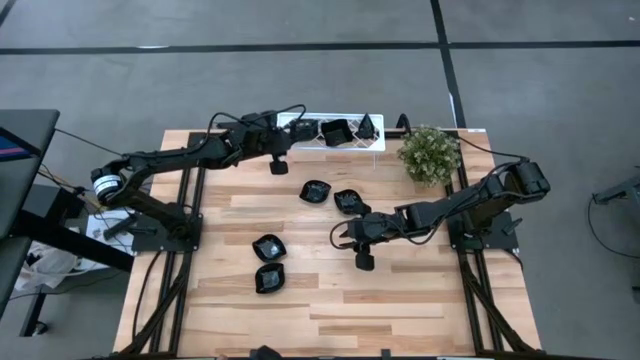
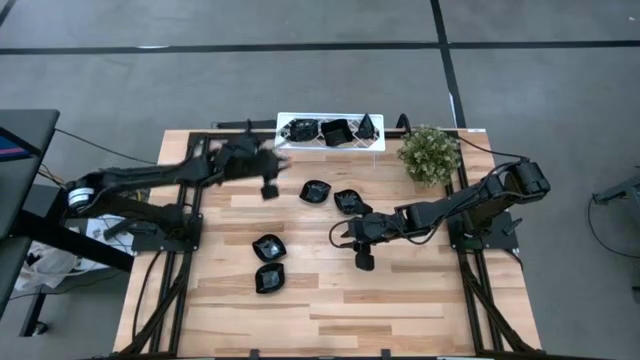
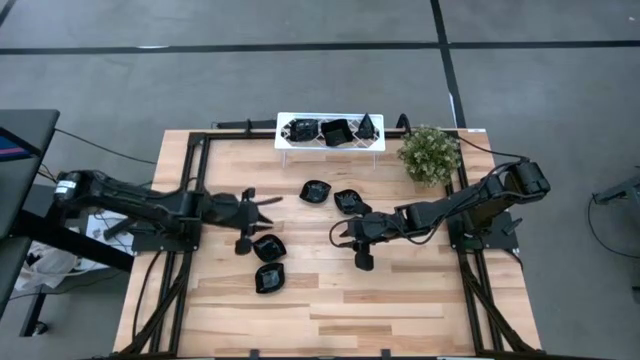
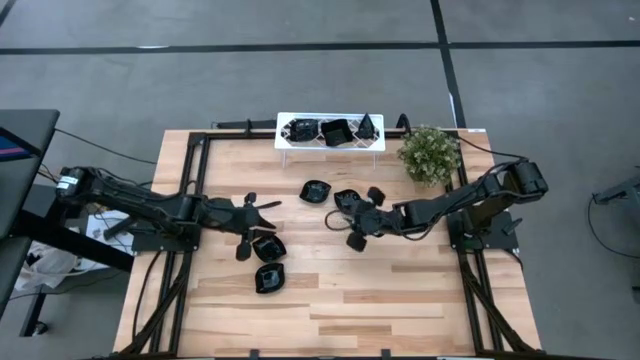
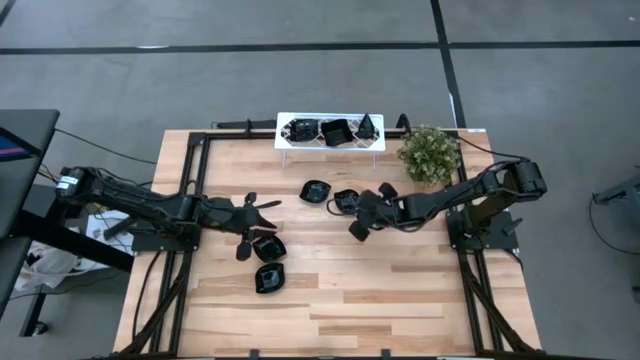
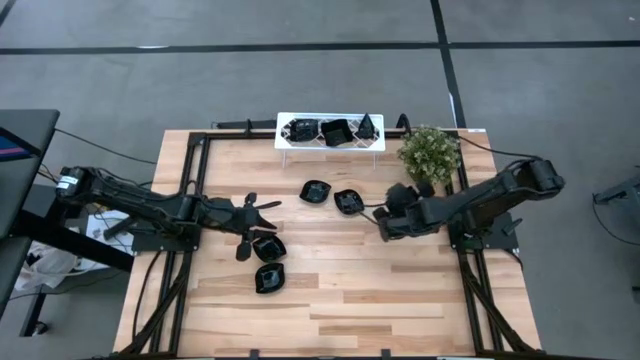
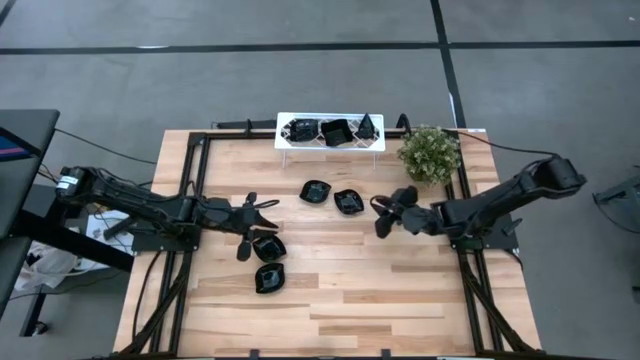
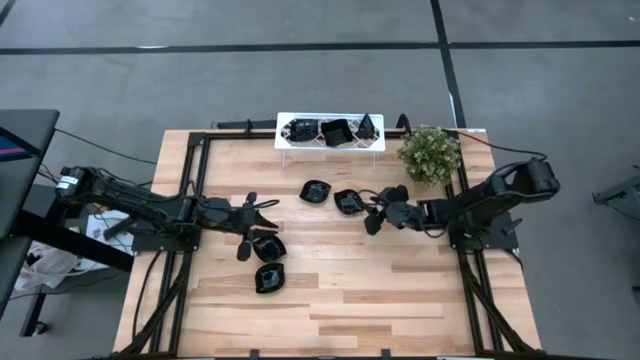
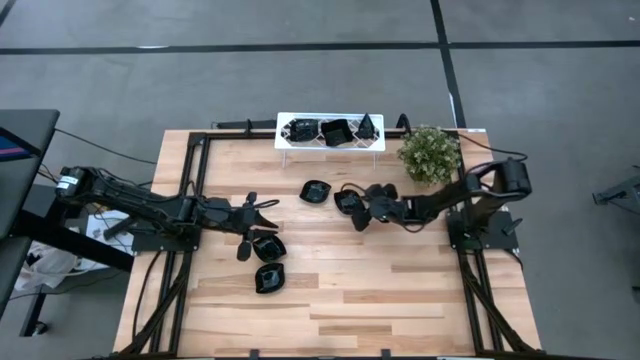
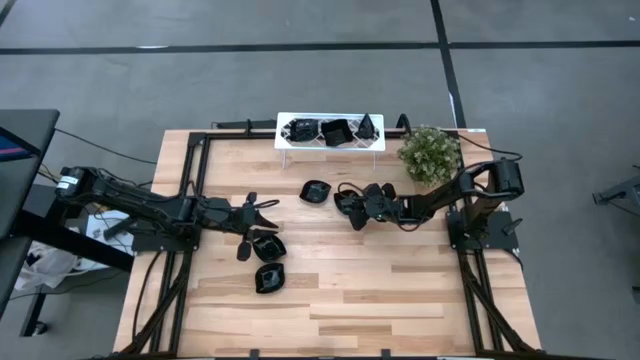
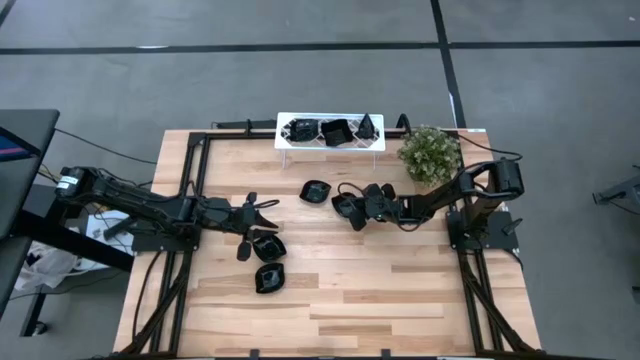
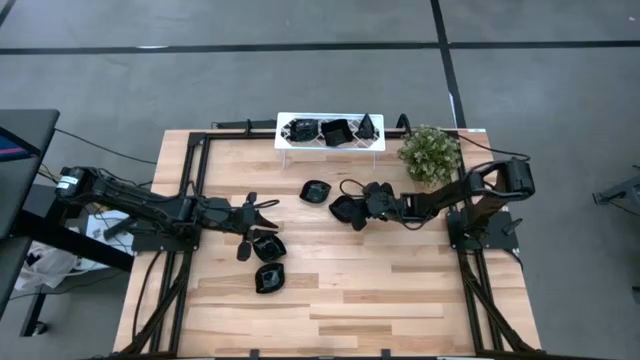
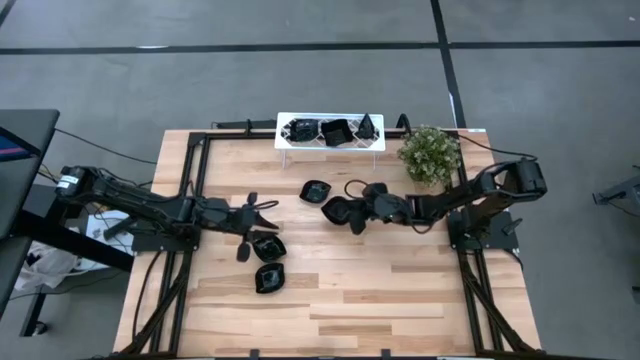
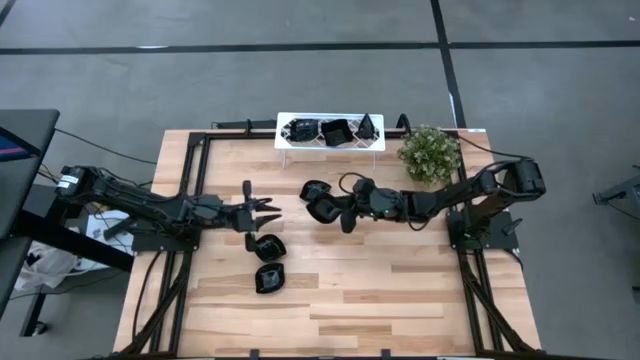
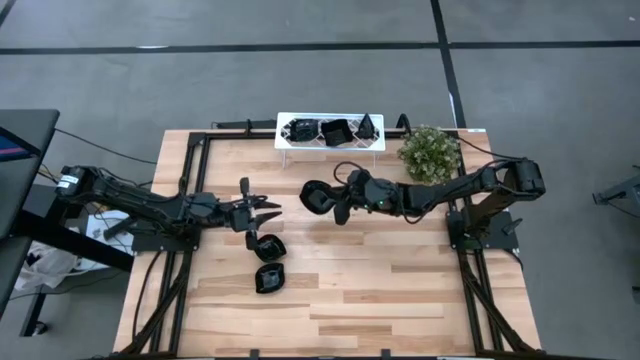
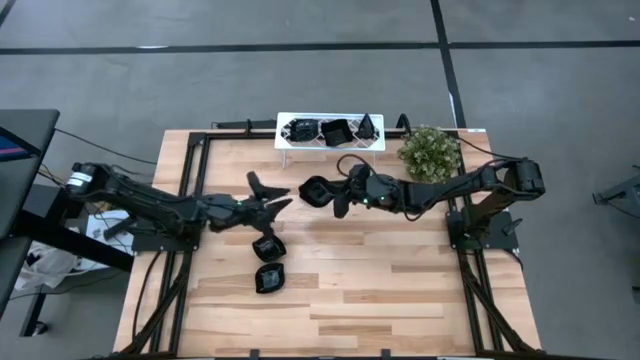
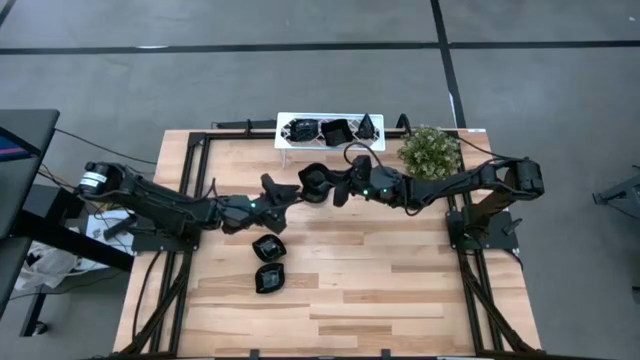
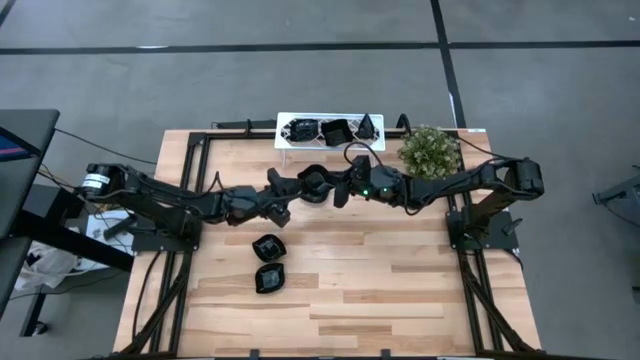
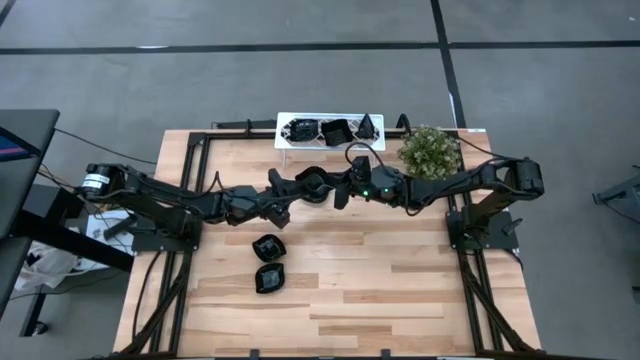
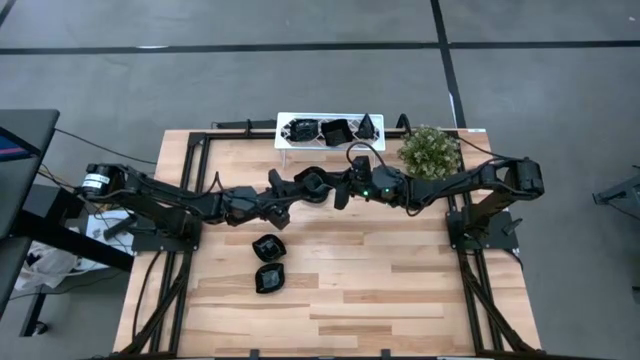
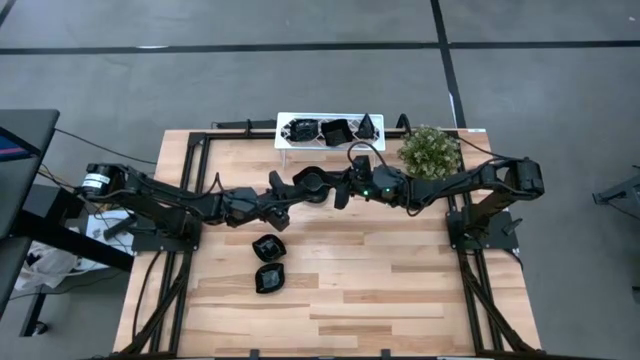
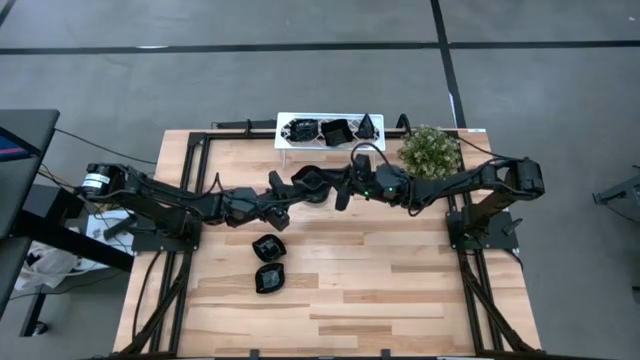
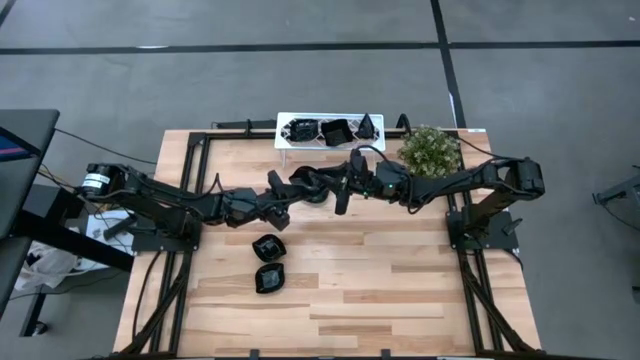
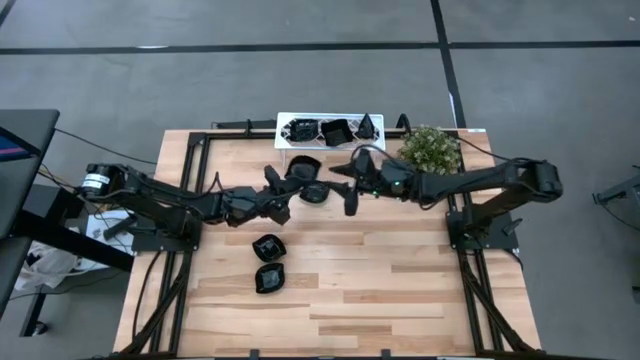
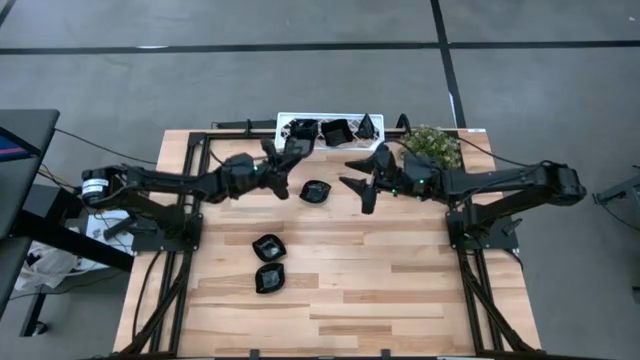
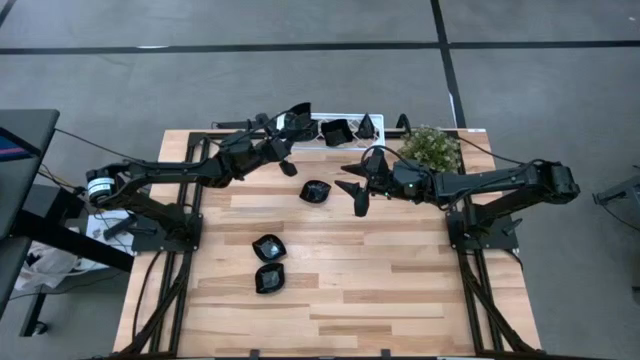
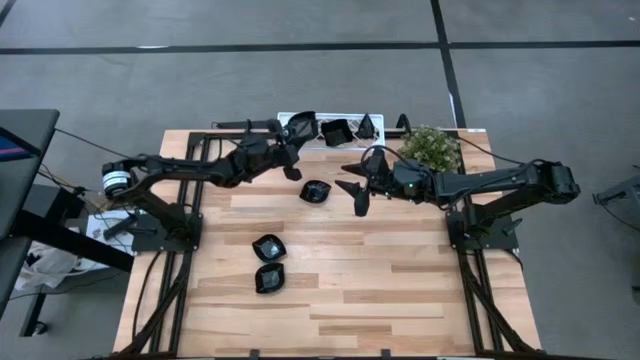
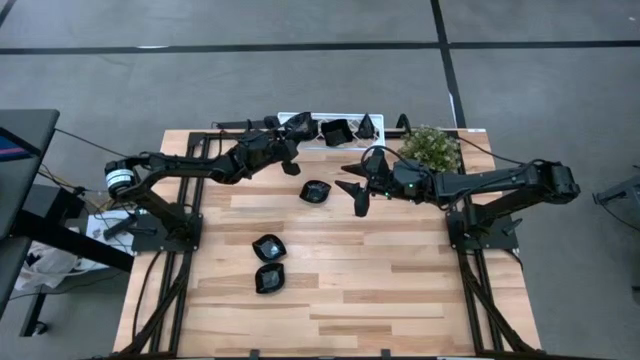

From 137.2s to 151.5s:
Task: Pick & Place Mini shaped plates
Stack the leaf-shaped plate on top of the leaf-shaped plate on the shelf

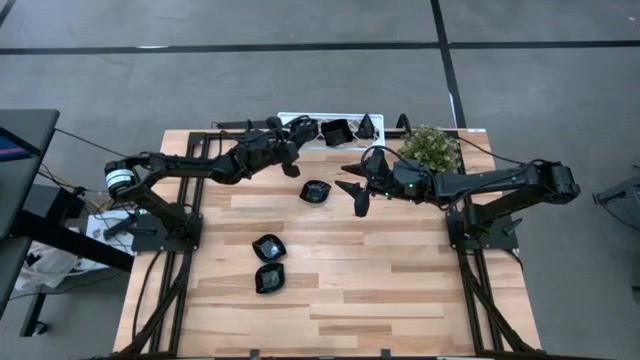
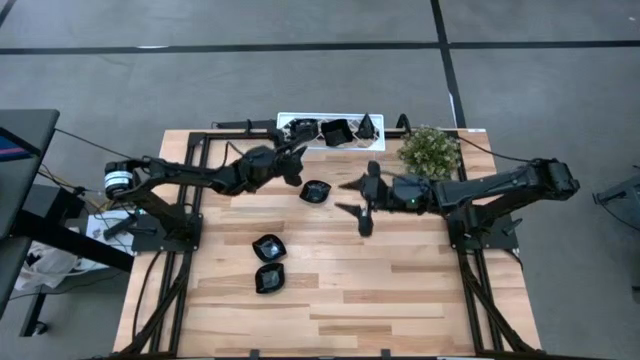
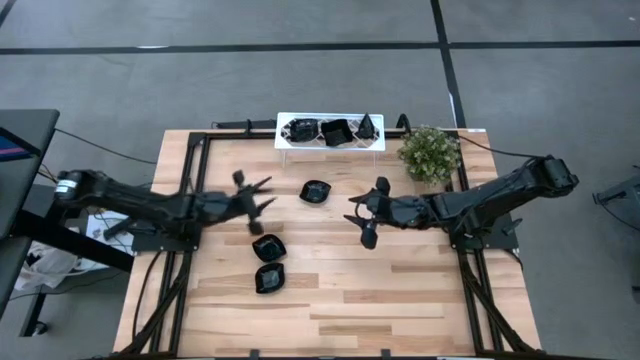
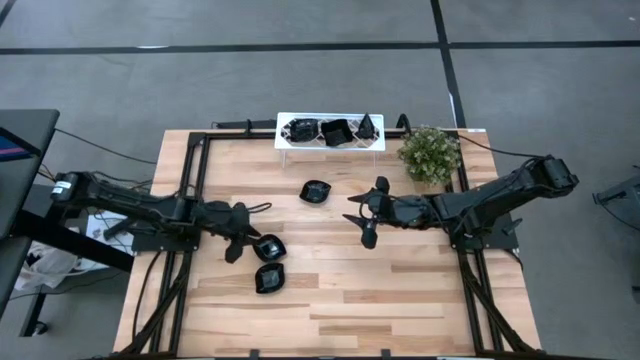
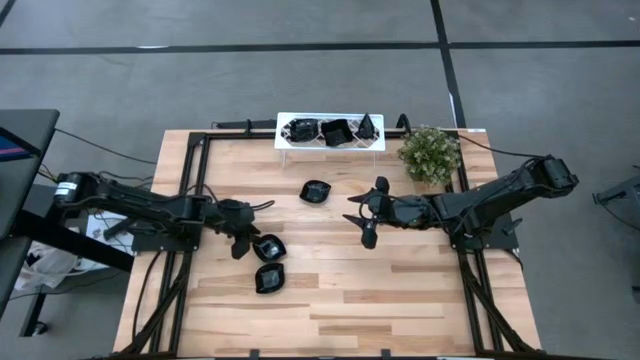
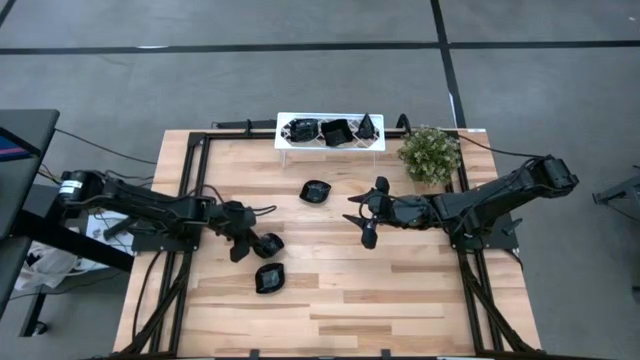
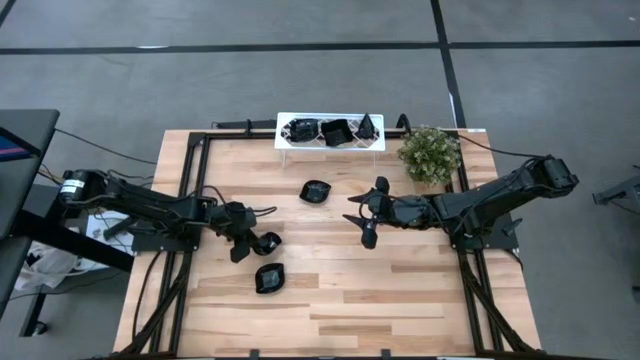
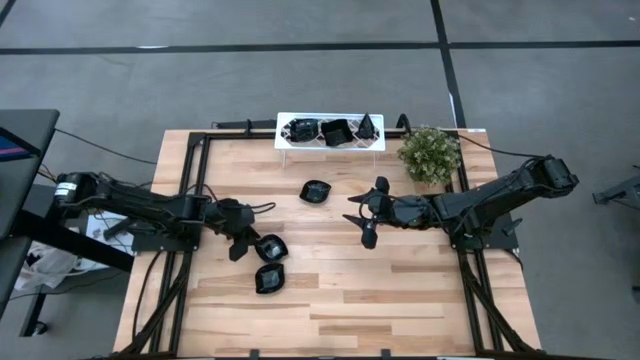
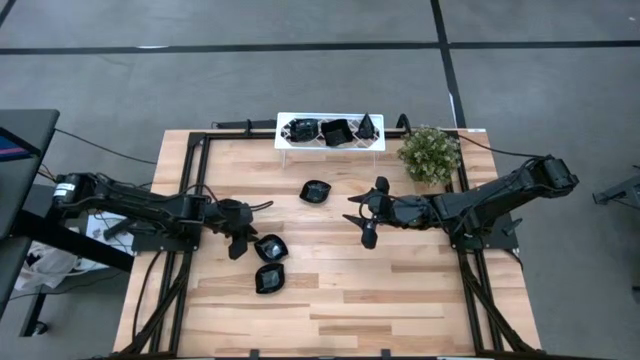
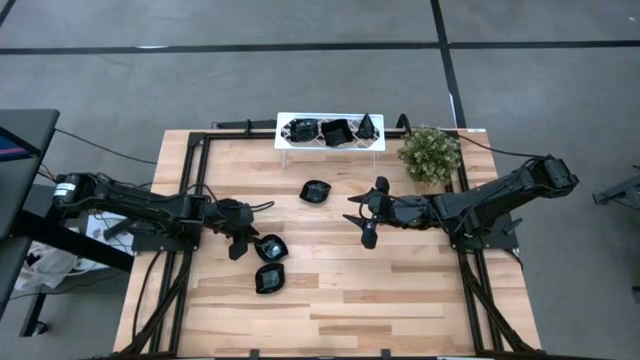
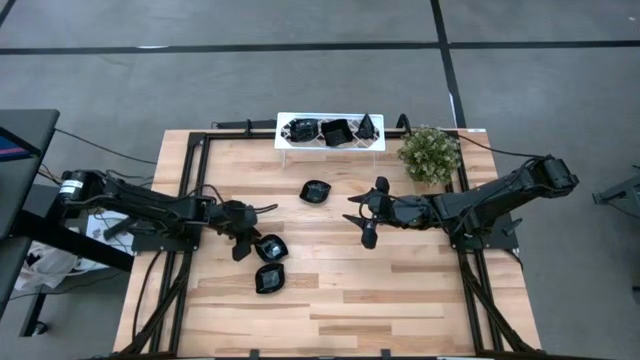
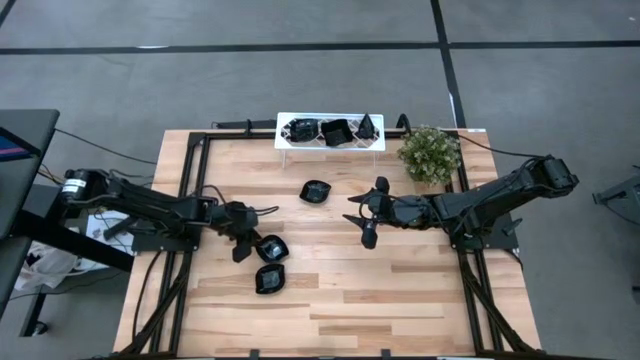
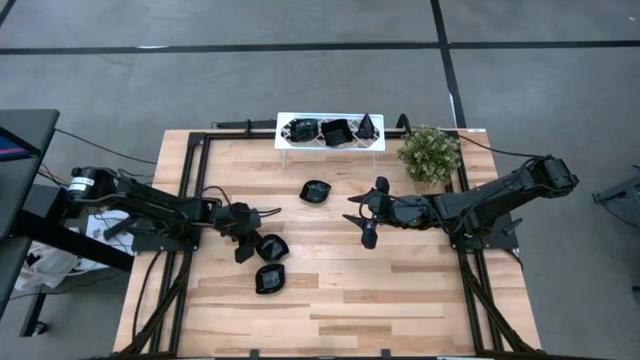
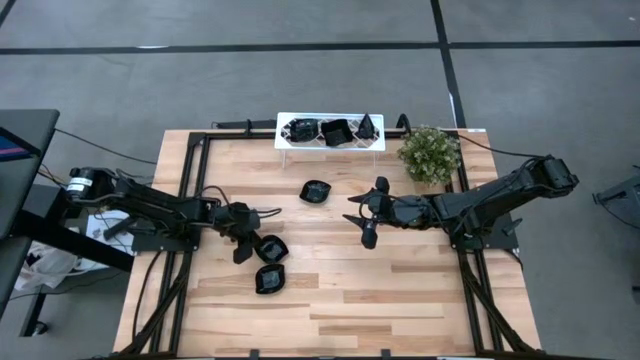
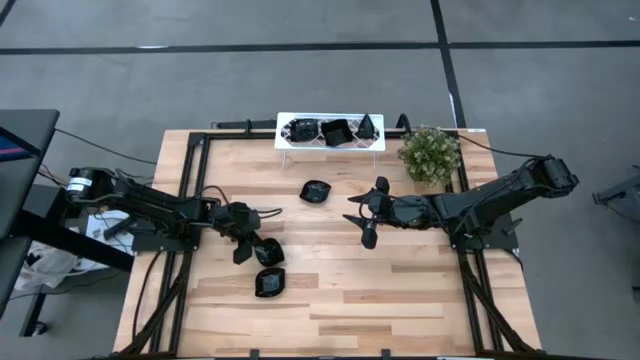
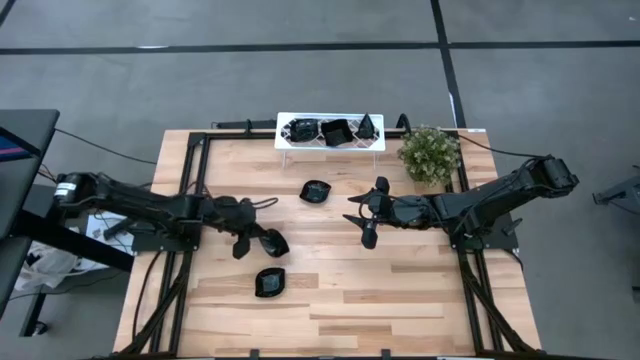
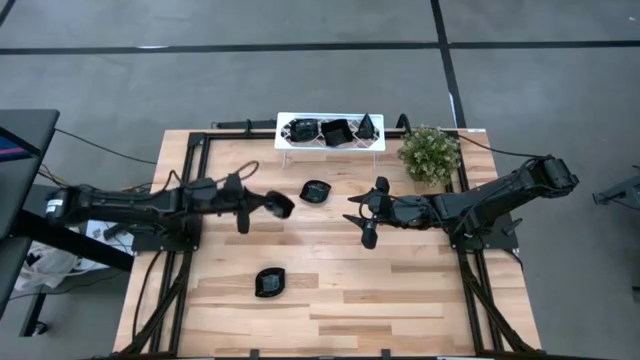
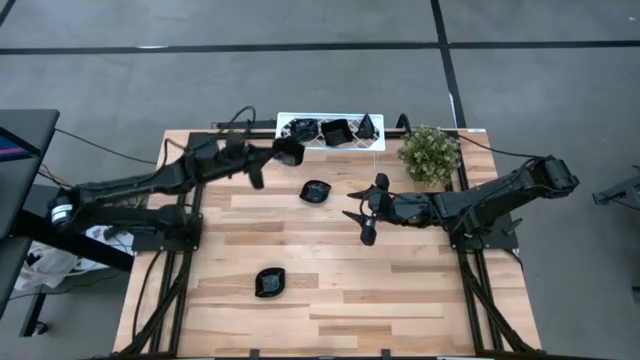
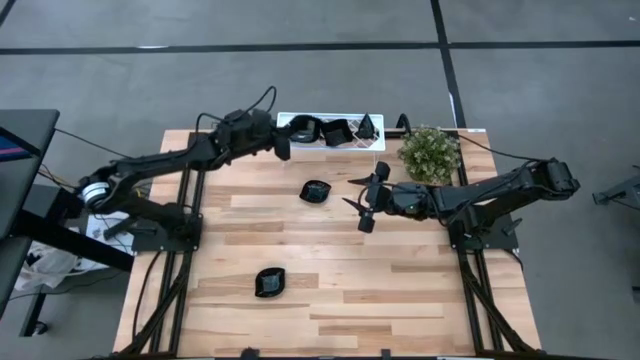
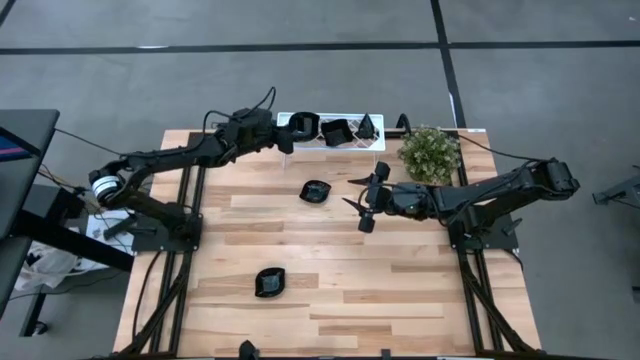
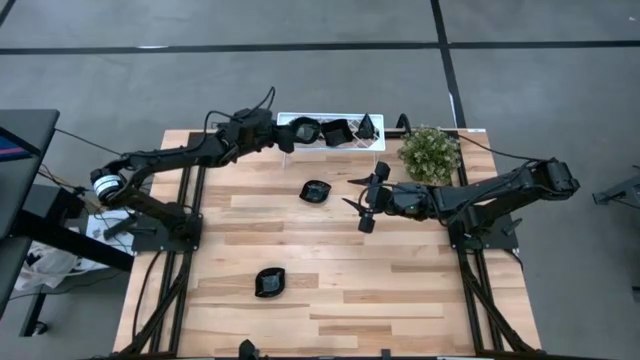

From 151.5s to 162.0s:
Stack the middle leaf-shaped plate on top of the leaf-shaped plates on the shelf
